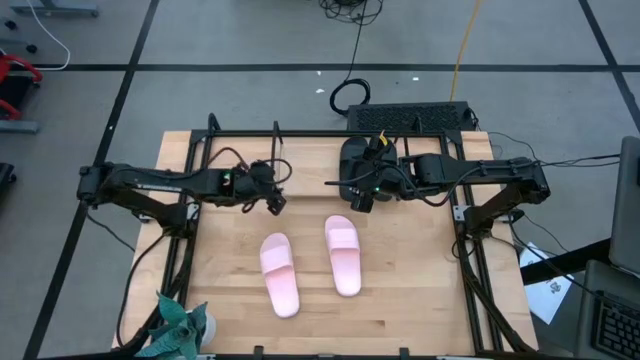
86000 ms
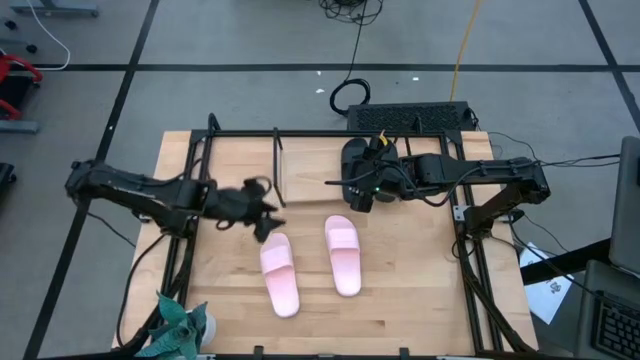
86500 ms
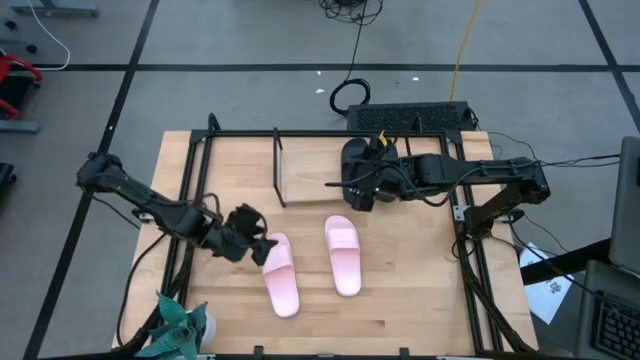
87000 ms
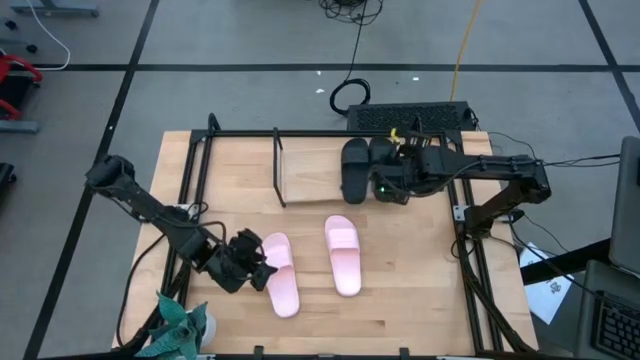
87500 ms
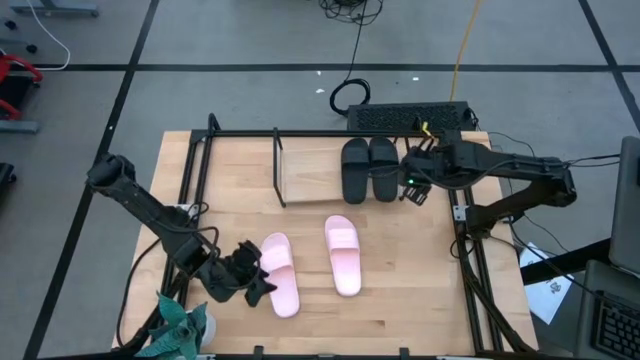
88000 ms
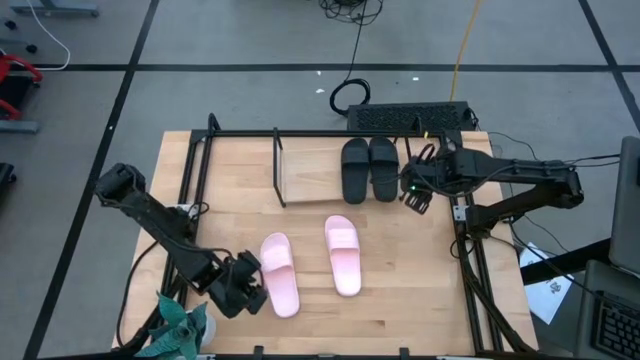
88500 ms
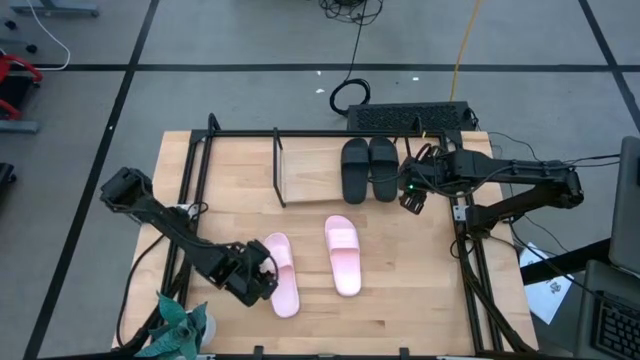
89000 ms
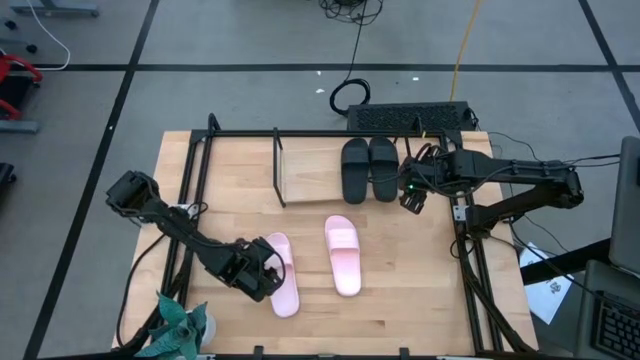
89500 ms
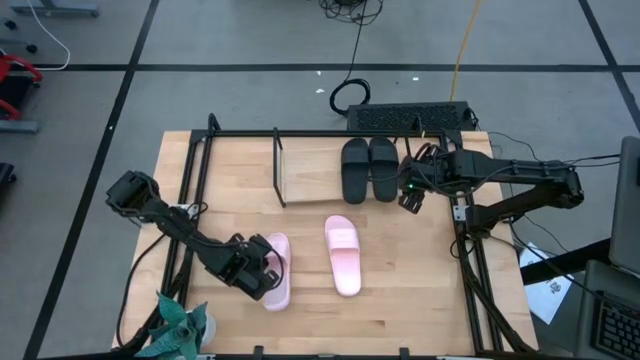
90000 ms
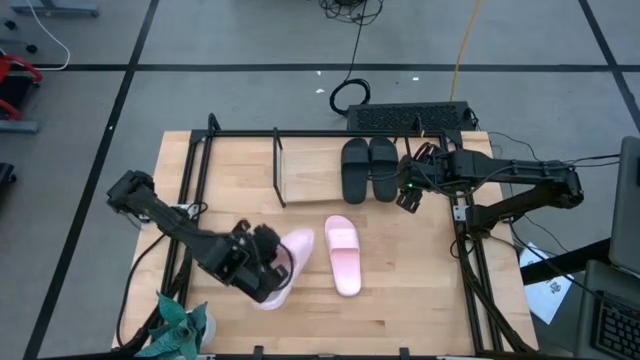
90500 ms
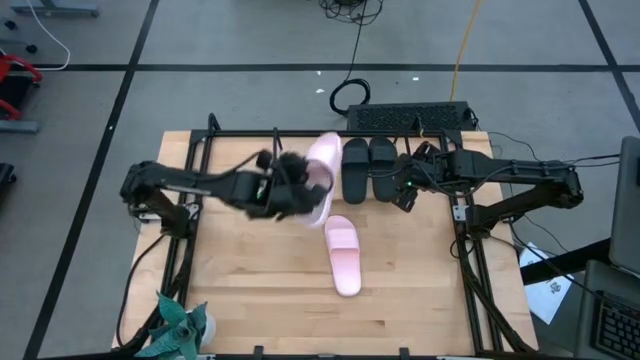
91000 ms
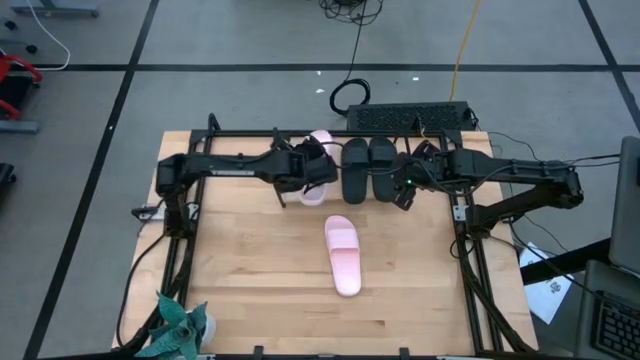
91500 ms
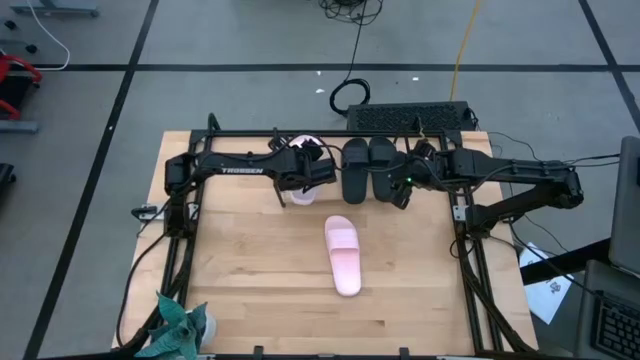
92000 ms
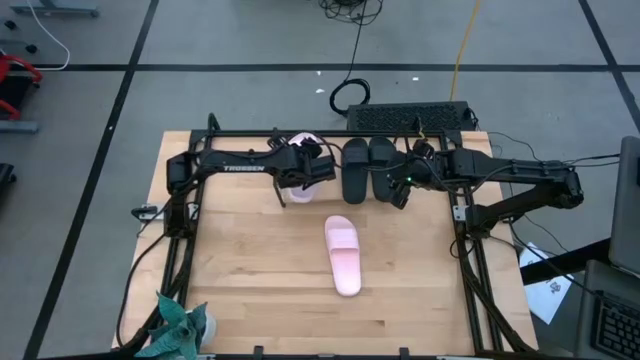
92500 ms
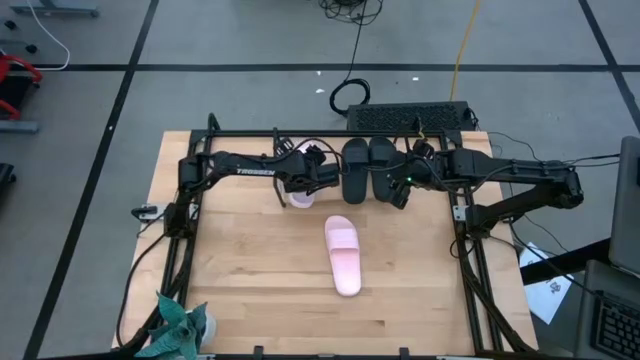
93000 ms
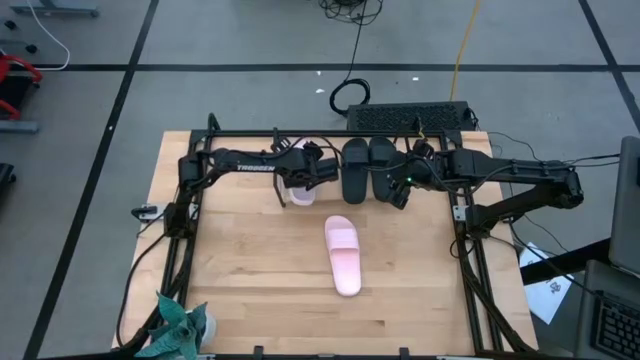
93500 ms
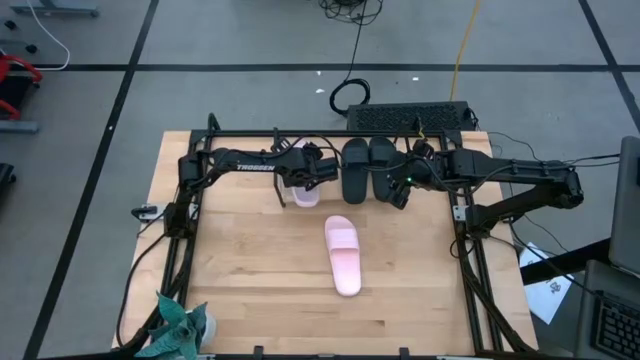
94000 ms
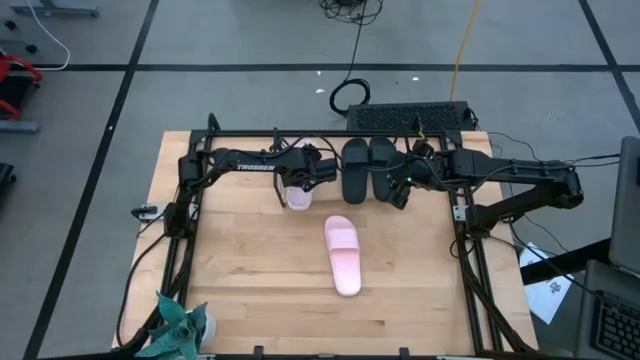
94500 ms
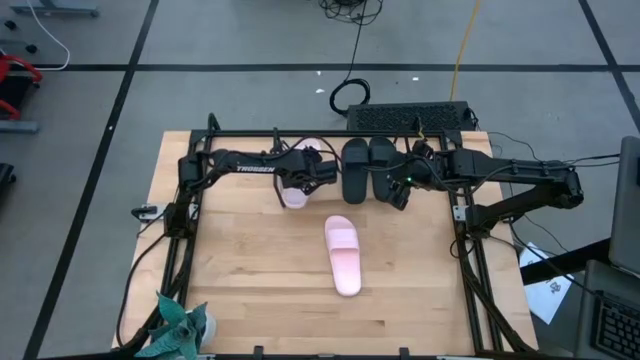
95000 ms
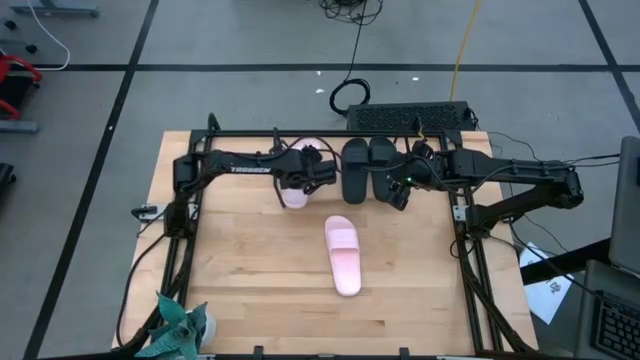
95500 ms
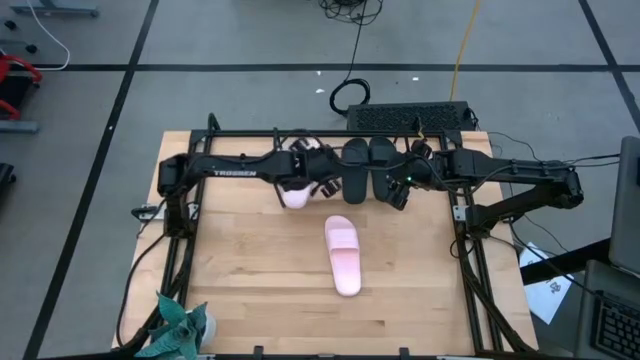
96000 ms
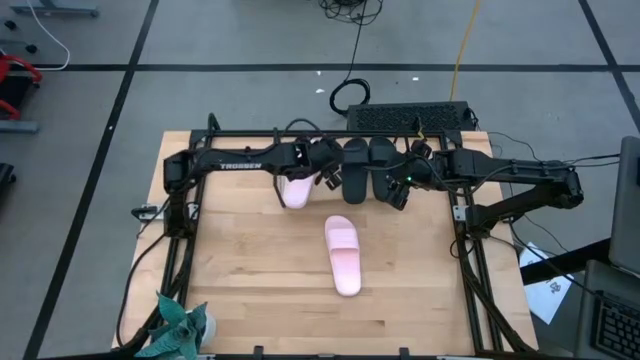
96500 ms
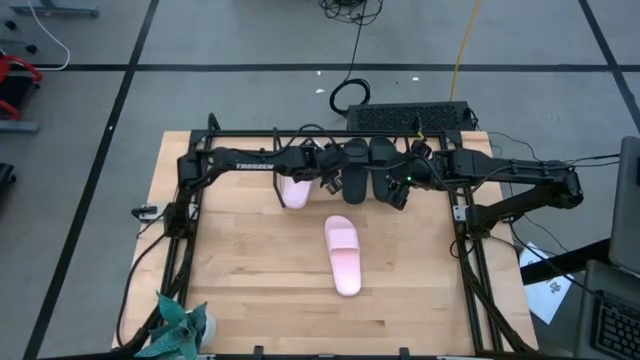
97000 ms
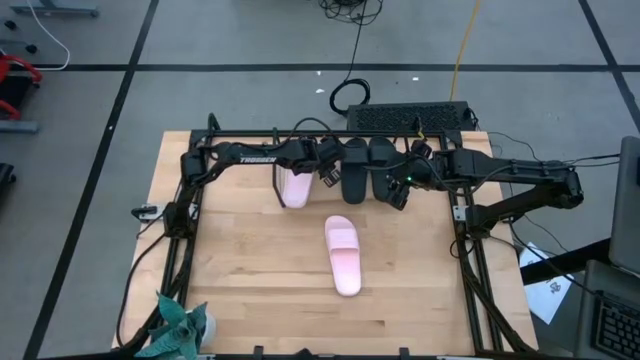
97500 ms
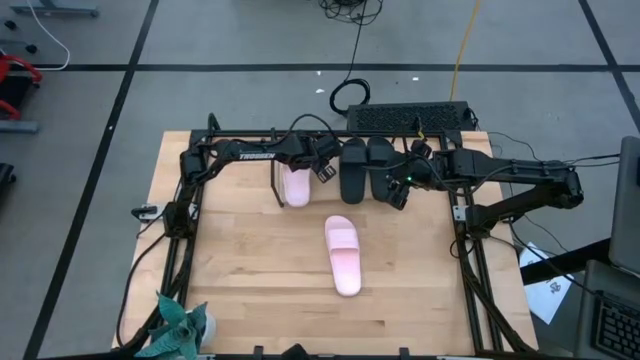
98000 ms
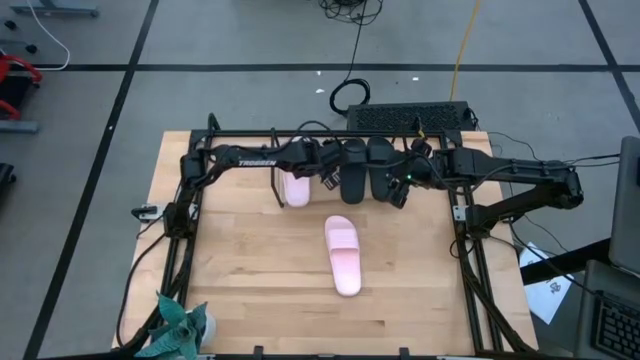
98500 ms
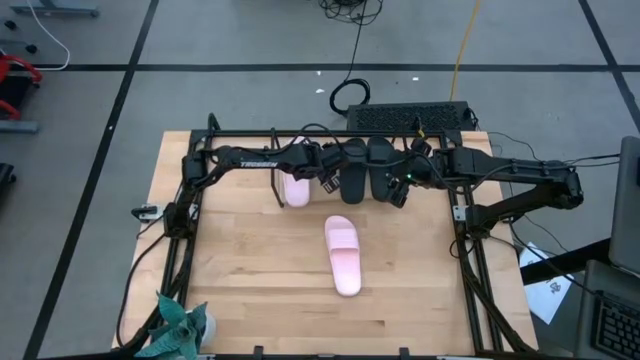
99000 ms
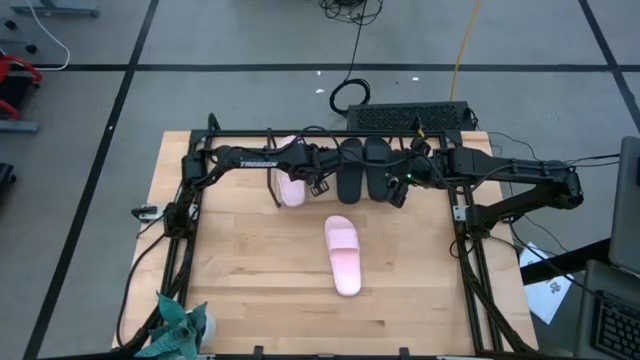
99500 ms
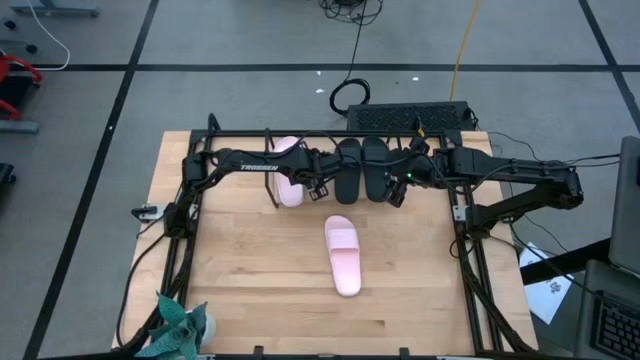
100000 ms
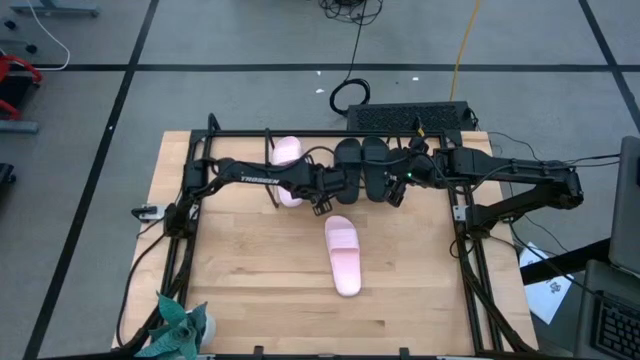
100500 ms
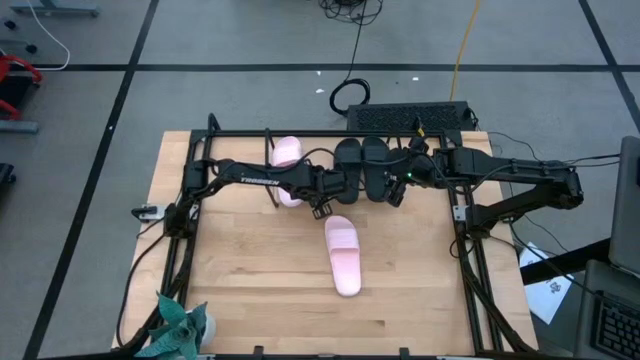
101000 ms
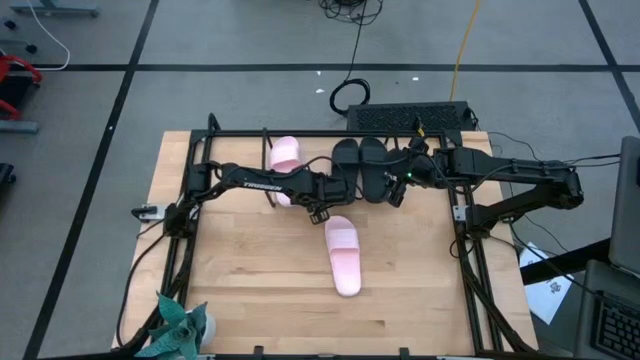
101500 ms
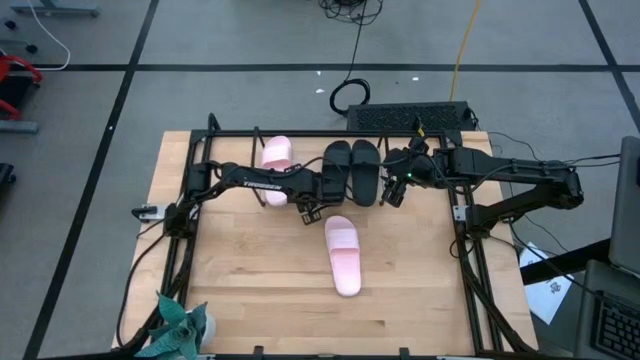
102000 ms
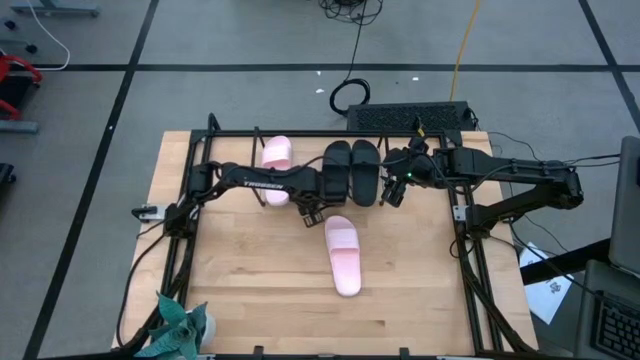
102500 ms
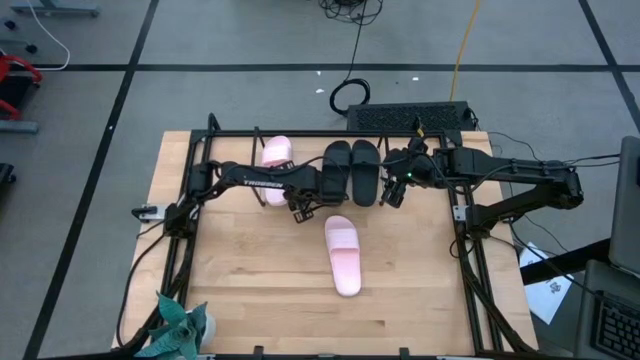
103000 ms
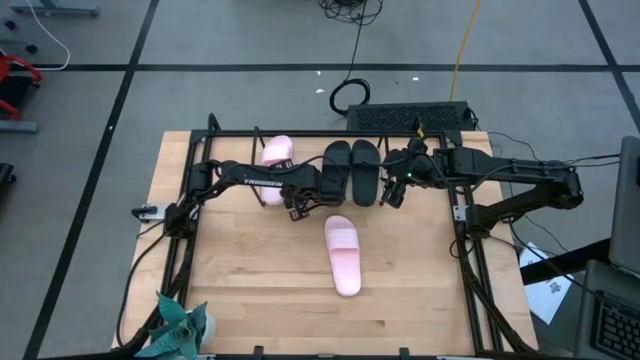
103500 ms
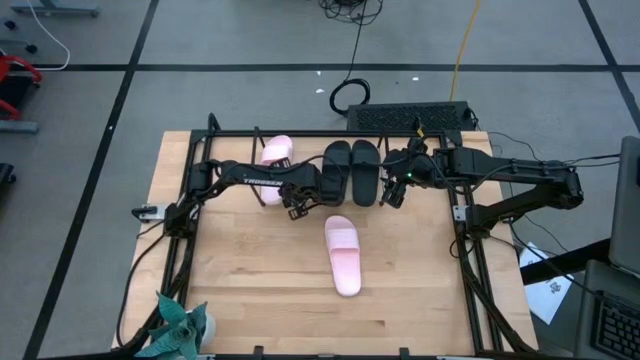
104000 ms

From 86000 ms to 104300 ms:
Task: Pick and place slides into the shelf
Put the left pink slide on the shelf

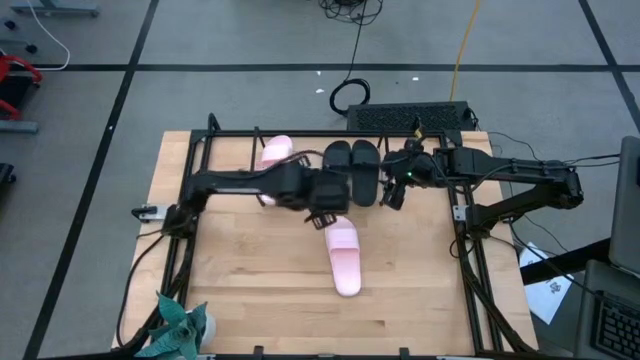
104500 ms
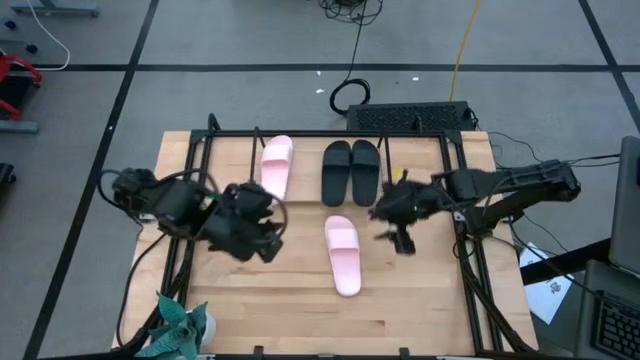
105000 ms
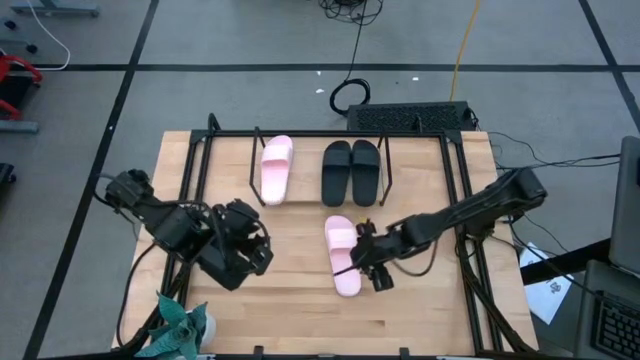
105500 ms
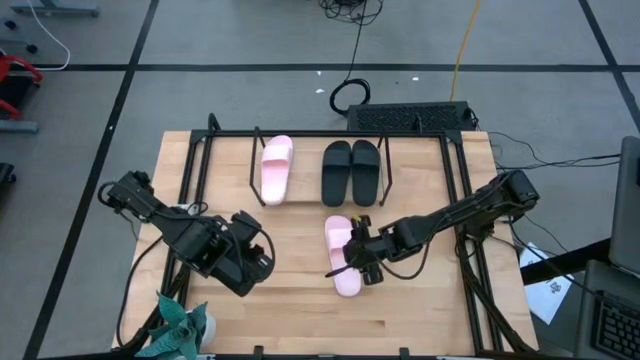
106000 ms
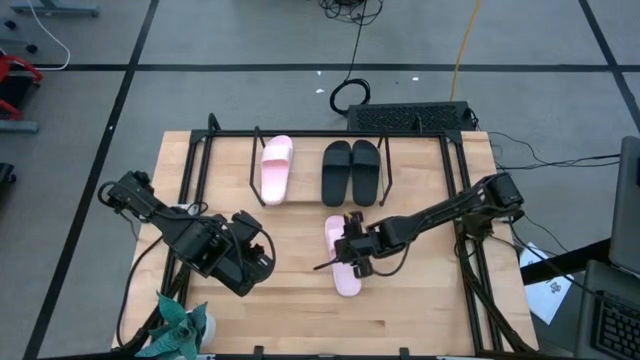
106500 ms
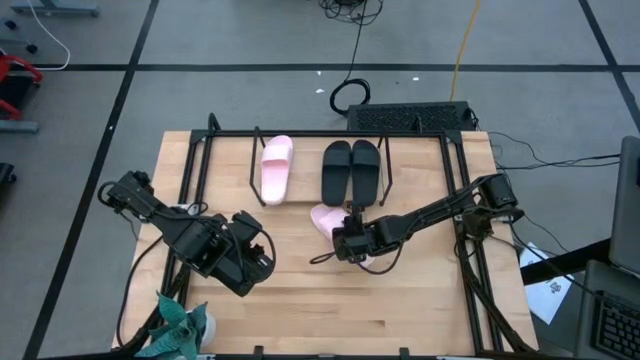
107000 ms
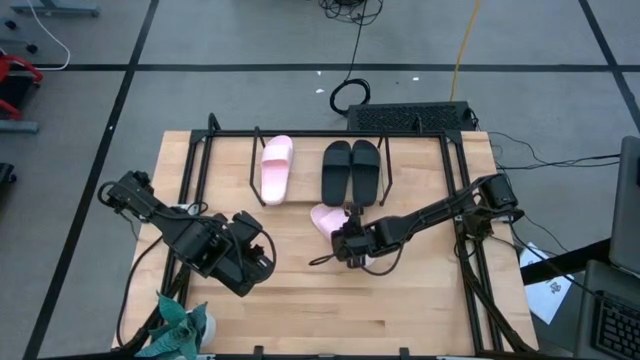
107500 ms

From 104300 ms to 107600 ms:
Put the pink slide on the shelf
